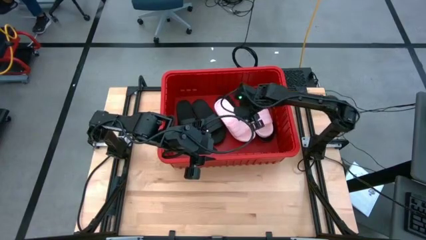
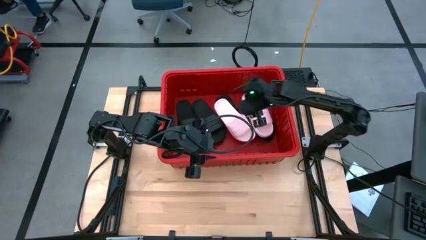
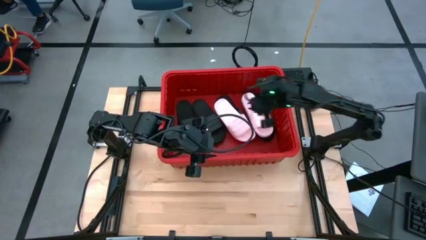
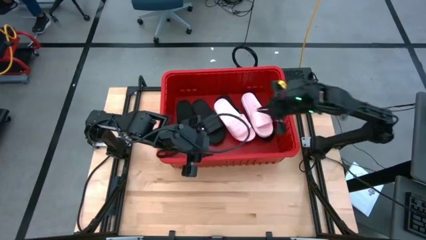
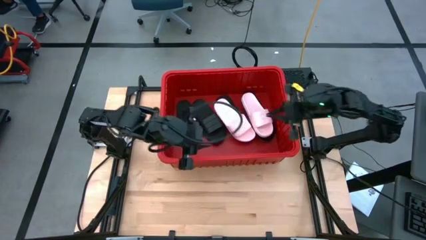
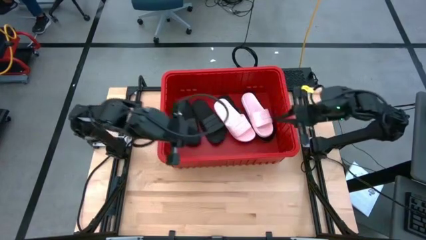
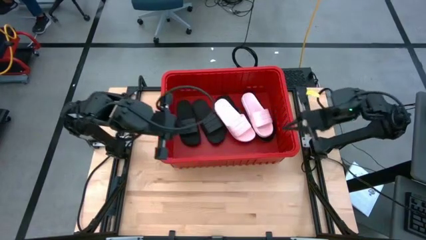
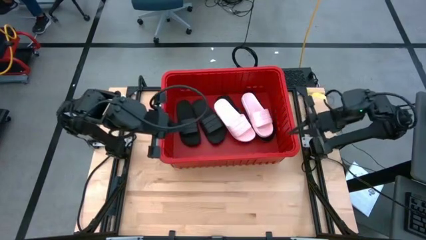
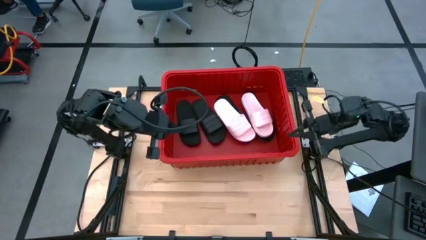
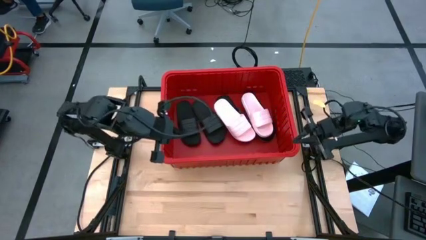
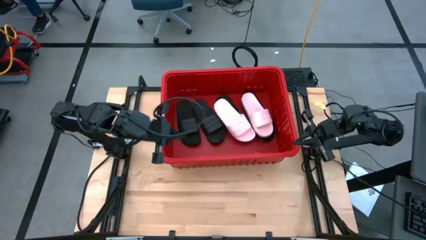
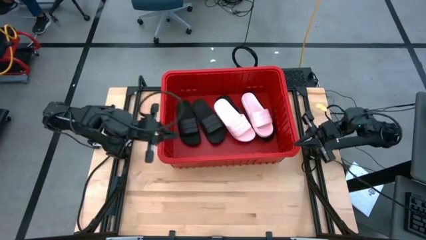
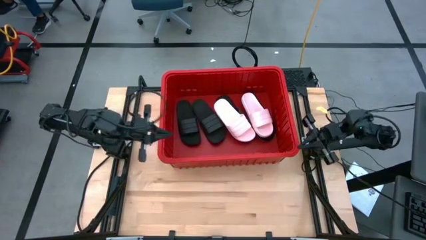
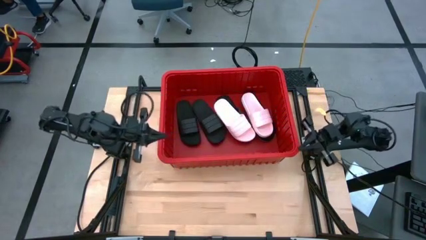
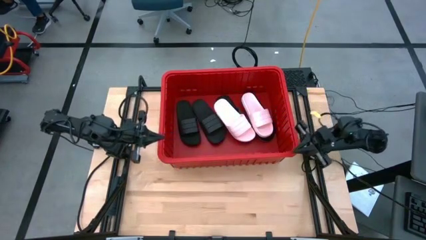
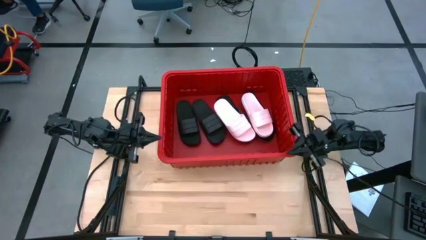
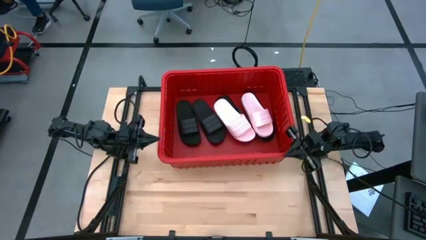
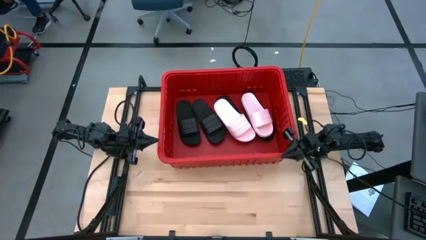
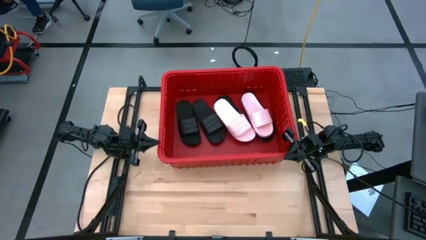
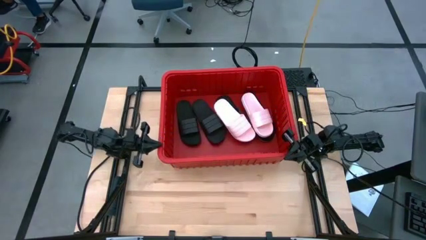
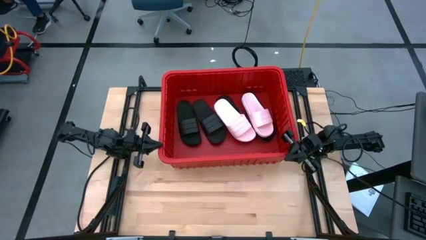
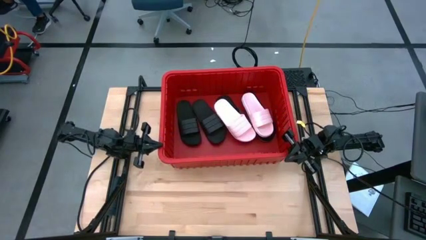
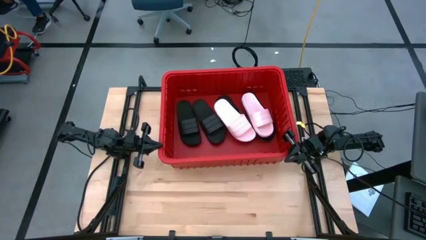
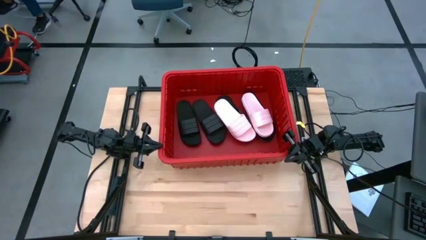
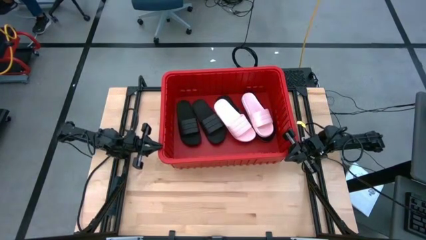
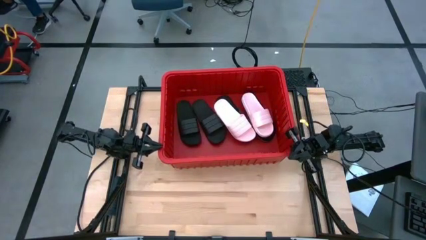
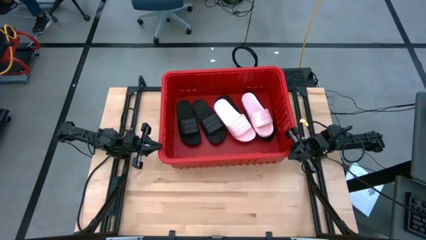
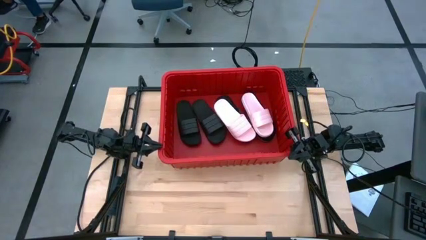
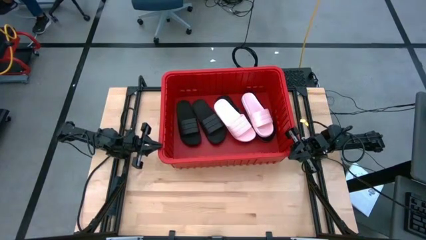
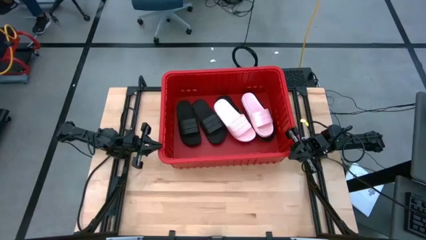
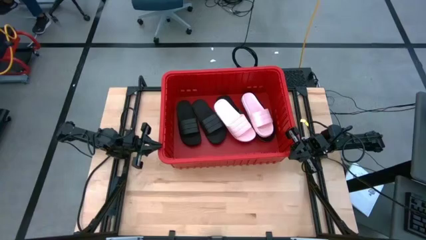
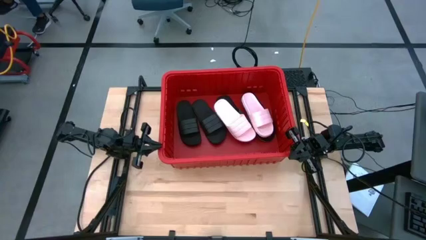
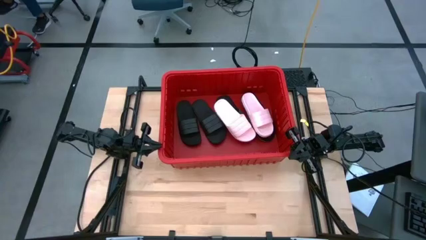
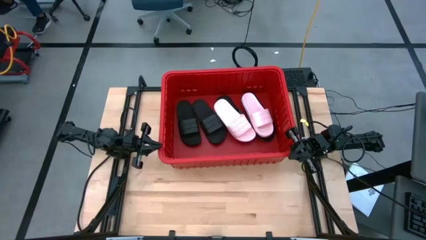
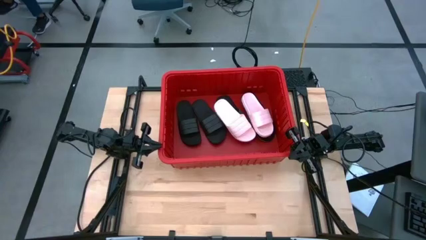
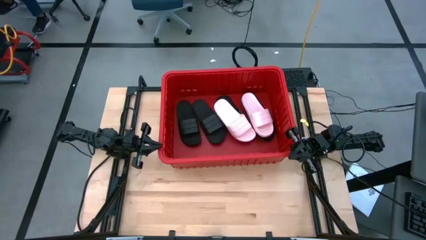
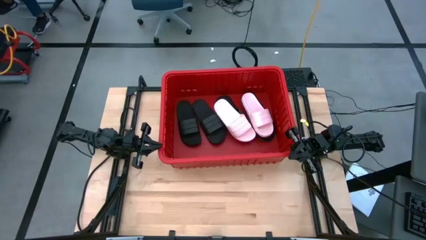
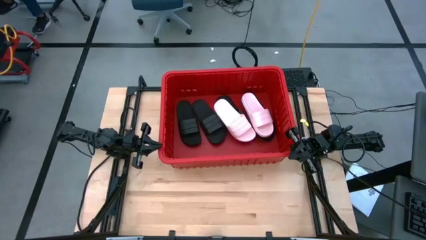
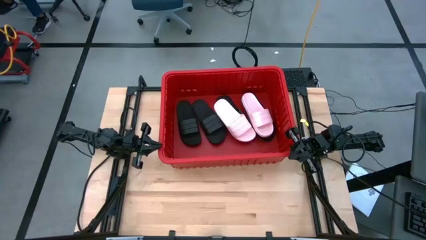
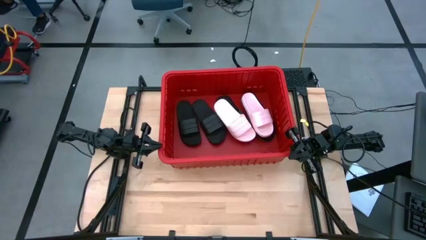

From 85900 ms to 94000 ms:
Task: Pick and place slides into bin
Return to Home Position

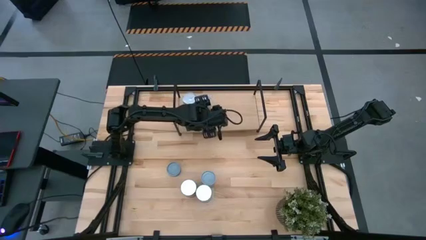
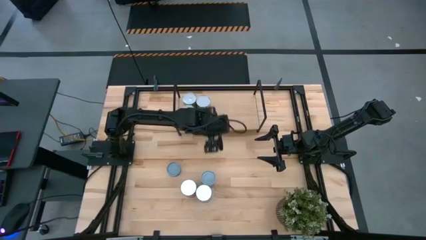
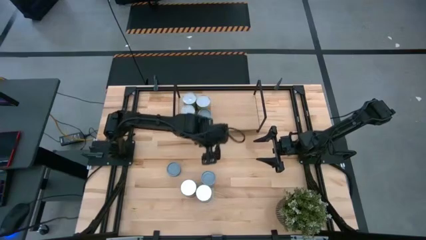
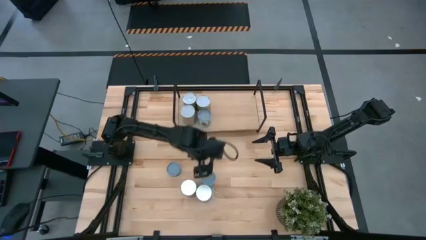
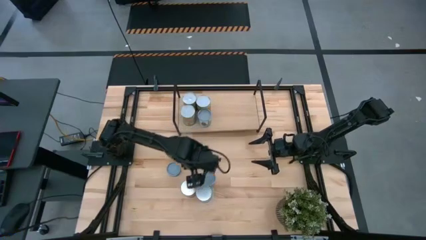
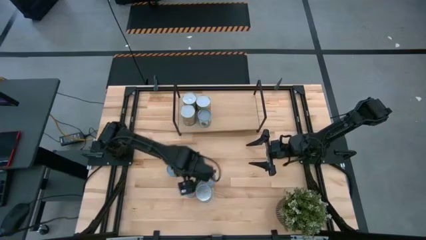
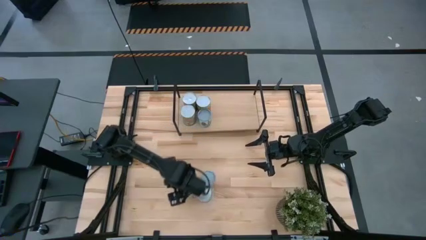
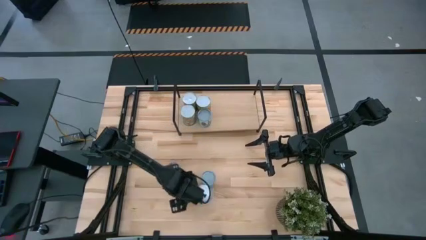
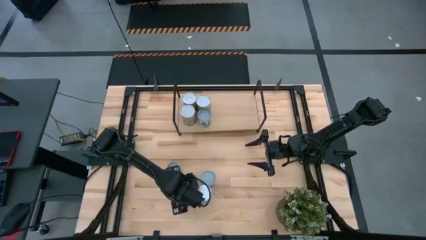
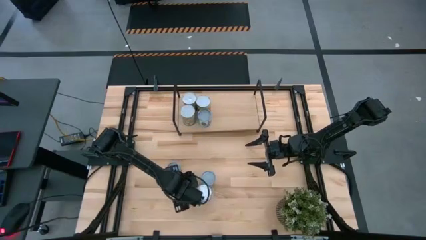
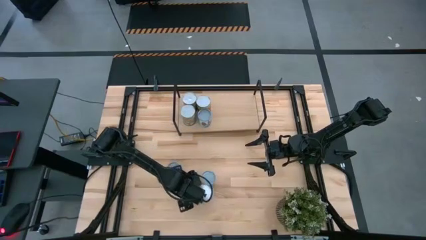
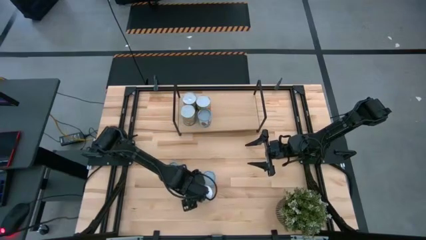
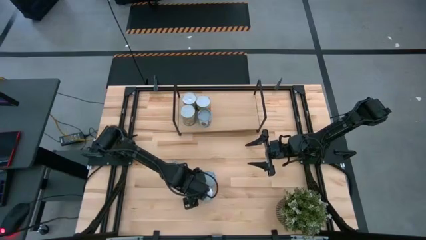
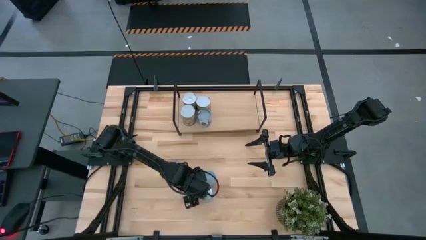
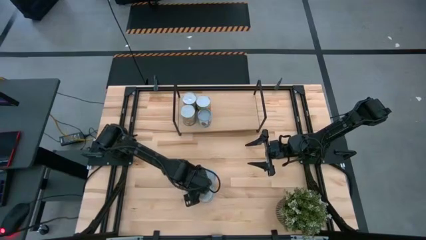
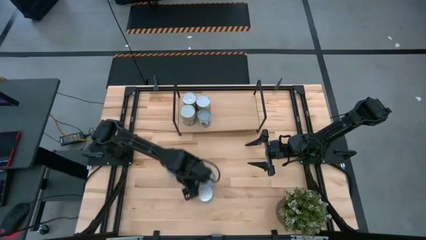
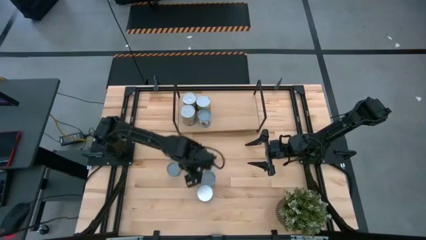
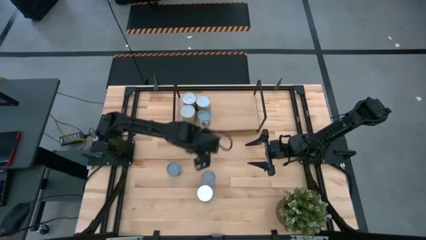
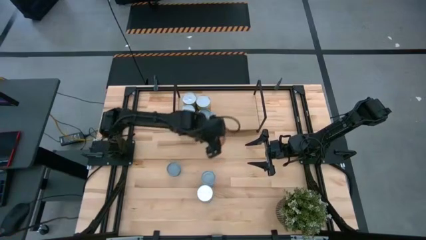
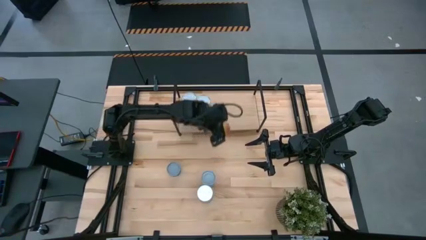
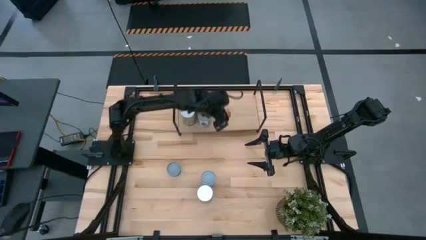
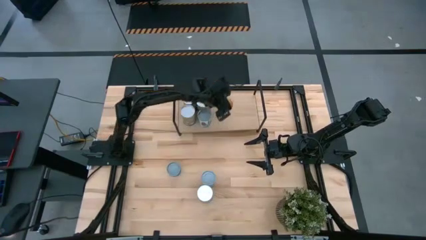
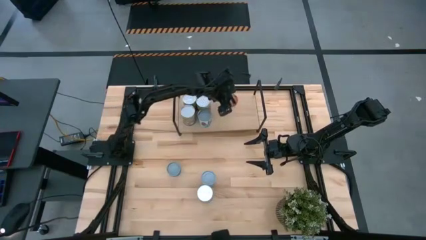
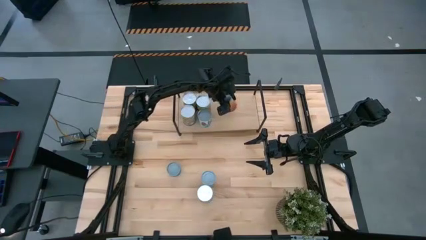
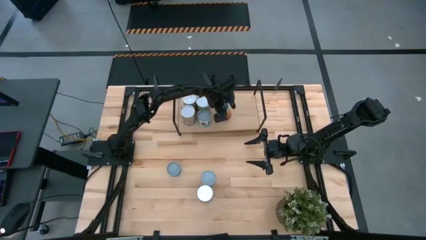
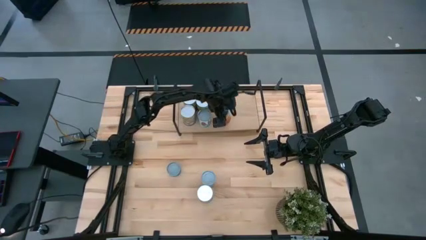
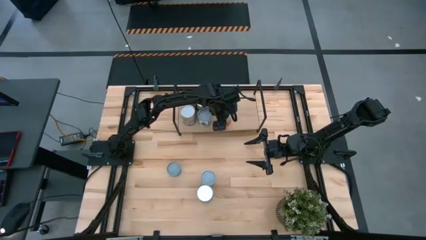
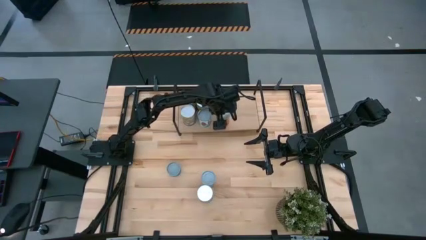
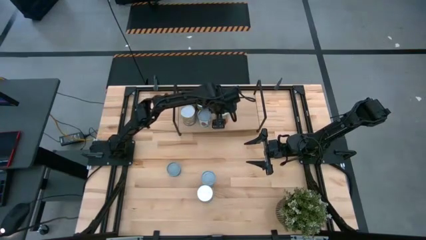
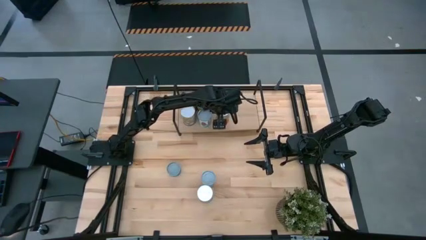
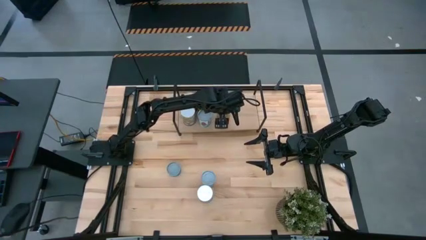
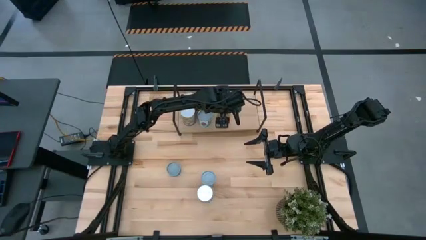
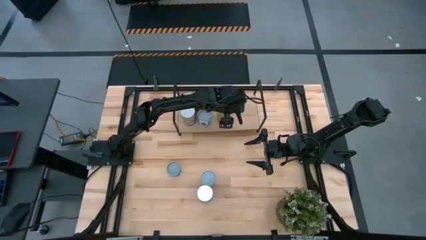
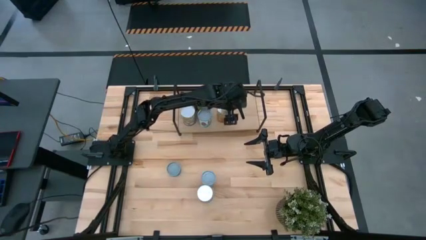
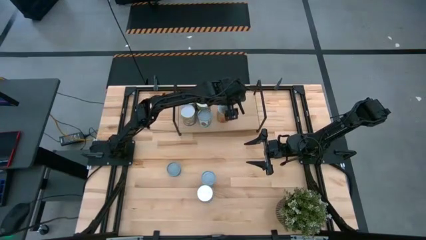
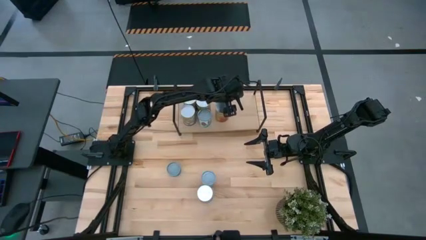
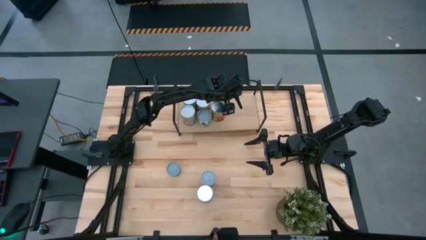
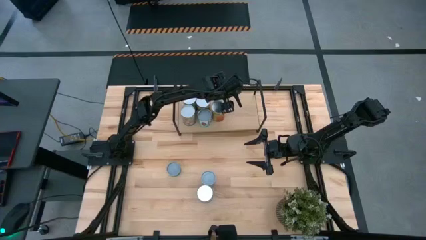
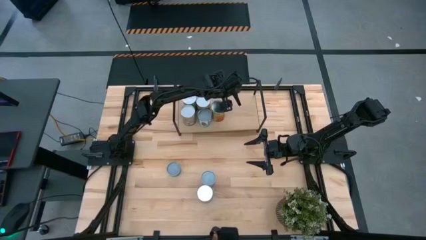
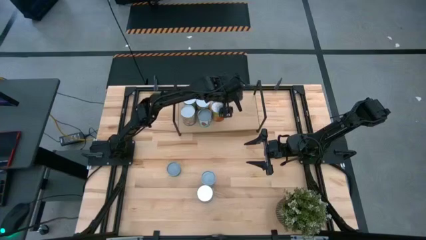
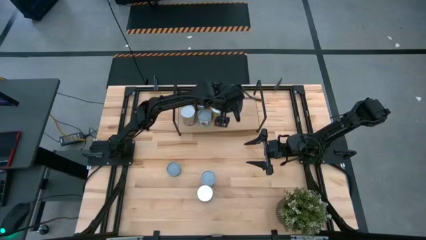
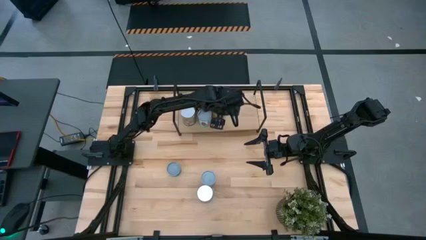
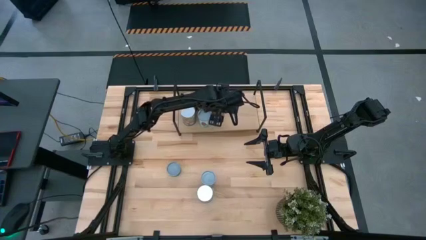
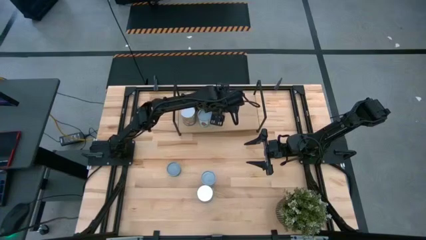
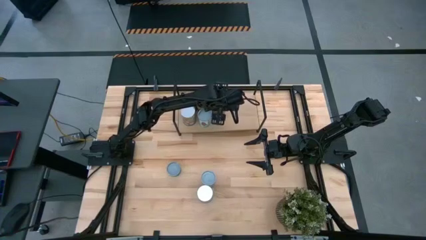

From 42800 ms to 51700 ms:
Task: Pick and place cans onto a shelf
Put the canned pineapple on the shelf
